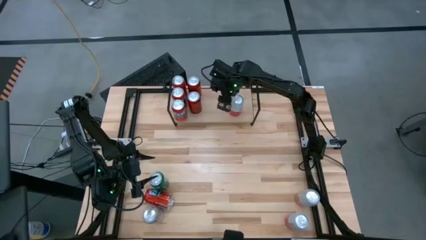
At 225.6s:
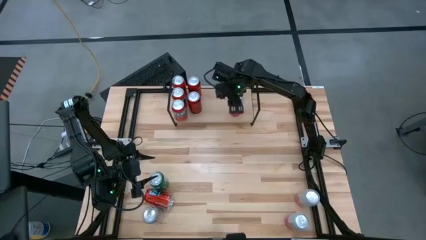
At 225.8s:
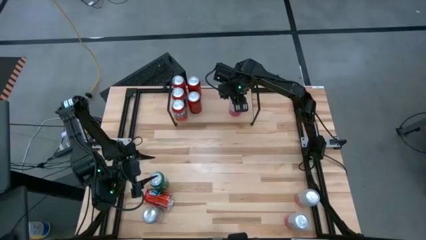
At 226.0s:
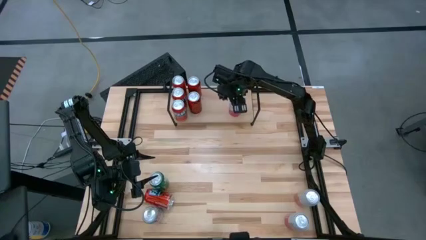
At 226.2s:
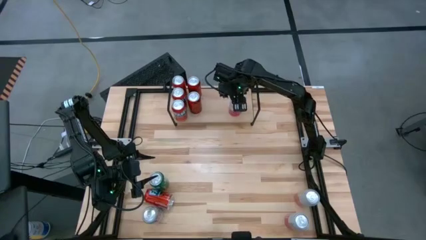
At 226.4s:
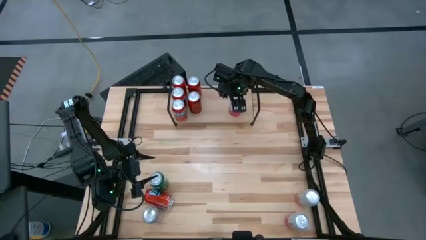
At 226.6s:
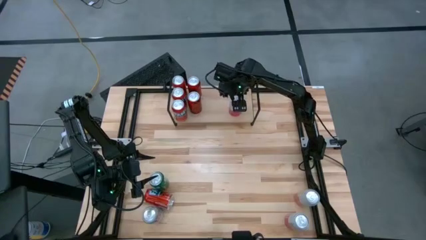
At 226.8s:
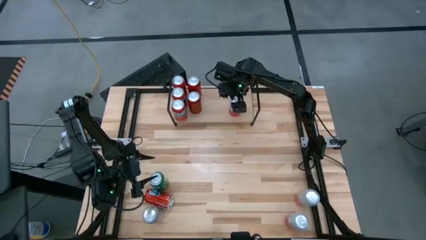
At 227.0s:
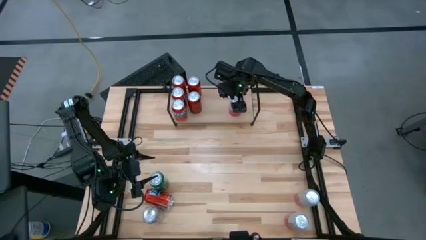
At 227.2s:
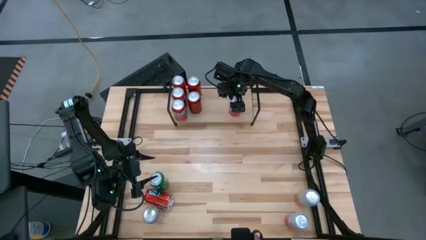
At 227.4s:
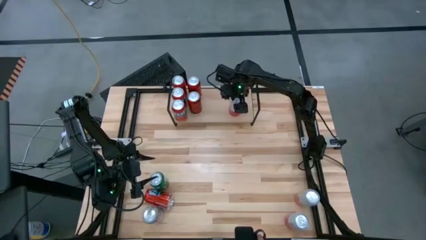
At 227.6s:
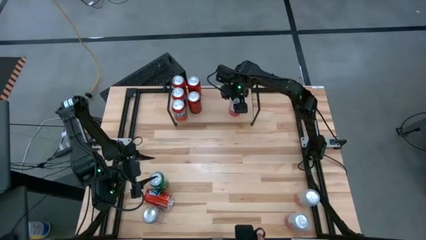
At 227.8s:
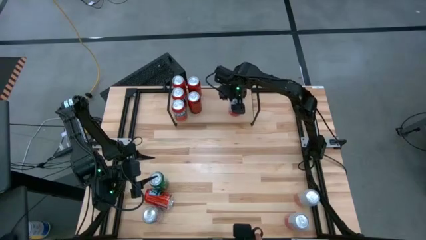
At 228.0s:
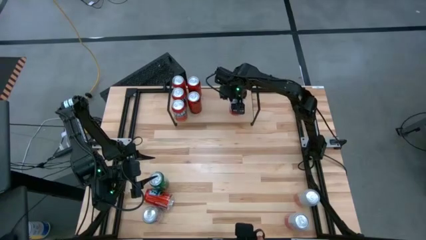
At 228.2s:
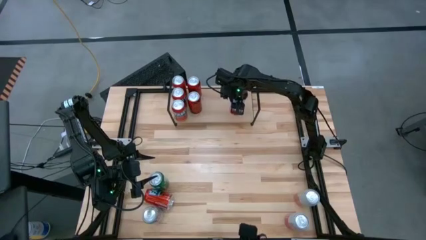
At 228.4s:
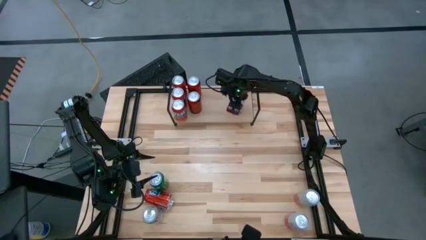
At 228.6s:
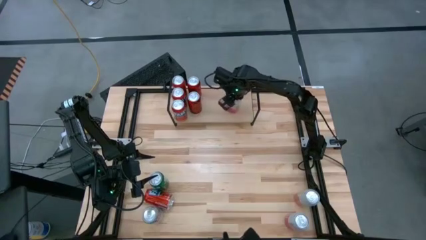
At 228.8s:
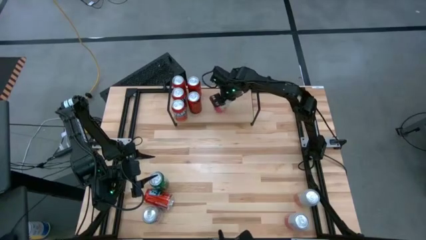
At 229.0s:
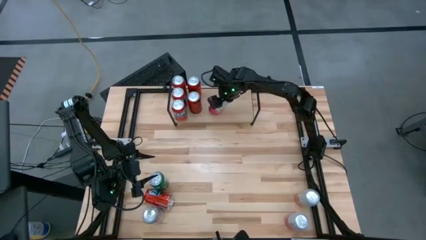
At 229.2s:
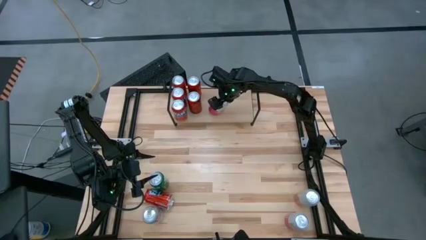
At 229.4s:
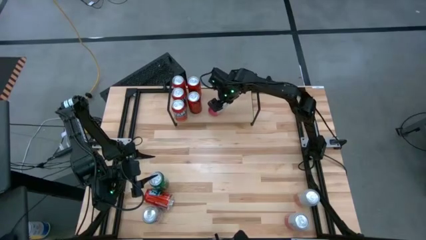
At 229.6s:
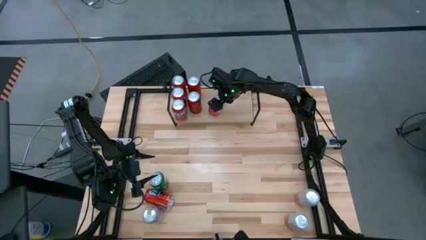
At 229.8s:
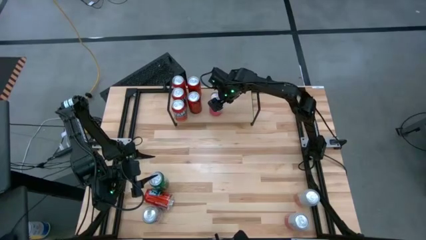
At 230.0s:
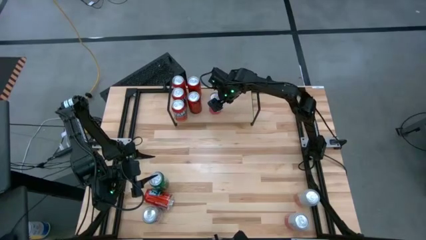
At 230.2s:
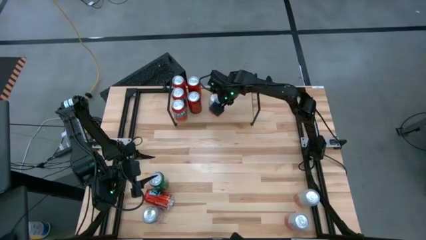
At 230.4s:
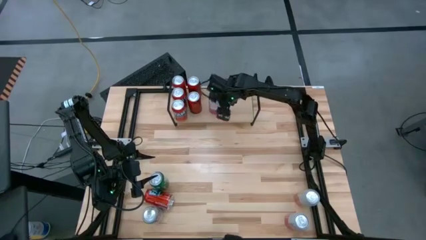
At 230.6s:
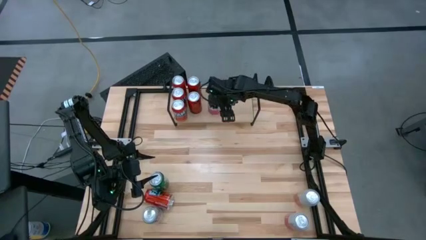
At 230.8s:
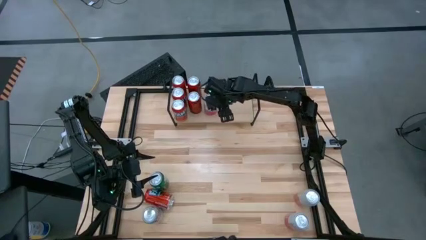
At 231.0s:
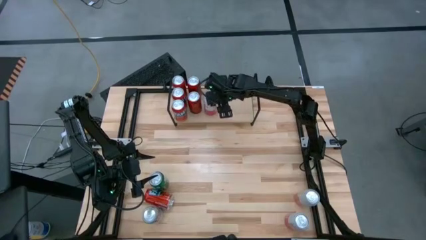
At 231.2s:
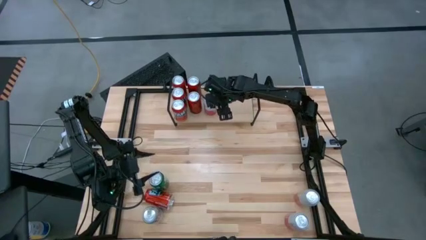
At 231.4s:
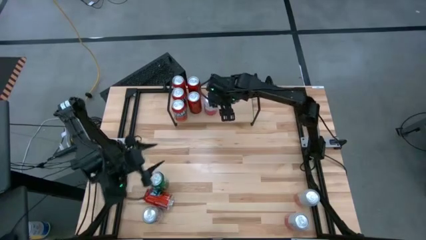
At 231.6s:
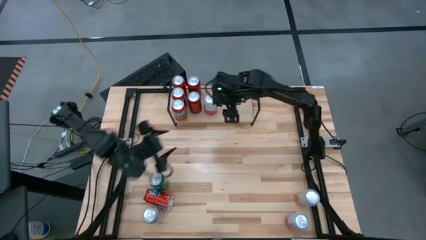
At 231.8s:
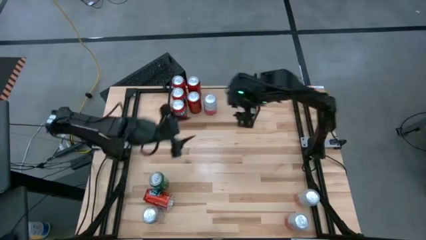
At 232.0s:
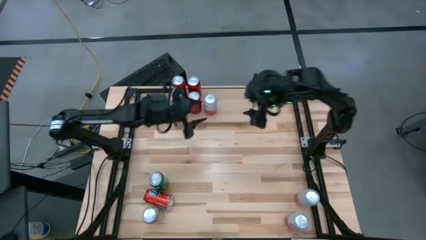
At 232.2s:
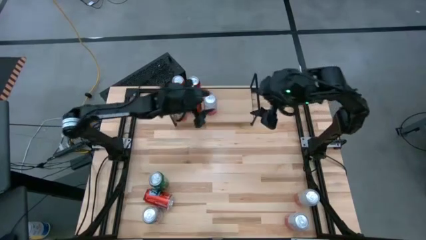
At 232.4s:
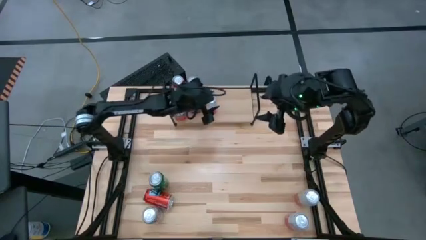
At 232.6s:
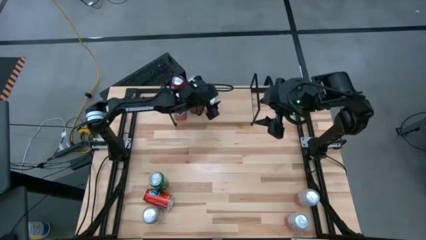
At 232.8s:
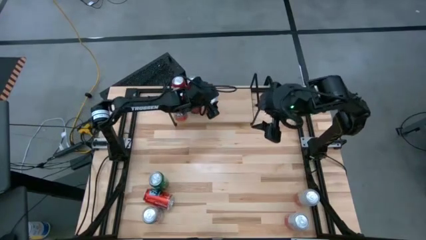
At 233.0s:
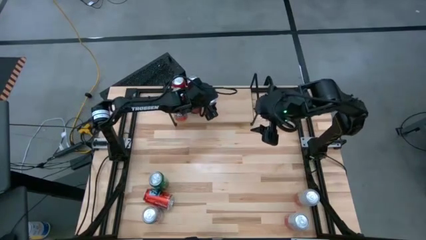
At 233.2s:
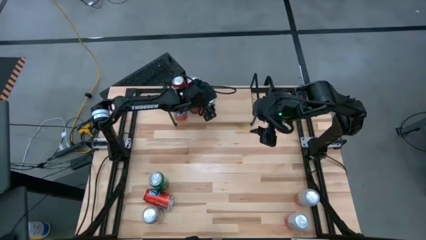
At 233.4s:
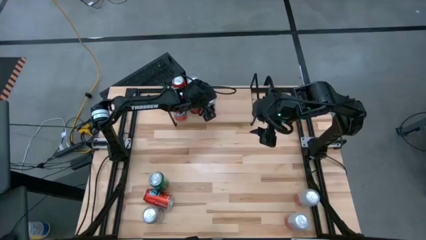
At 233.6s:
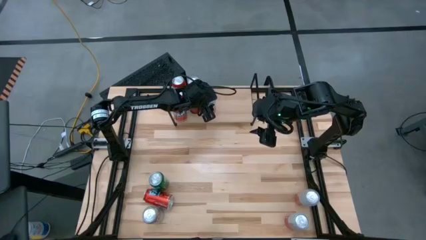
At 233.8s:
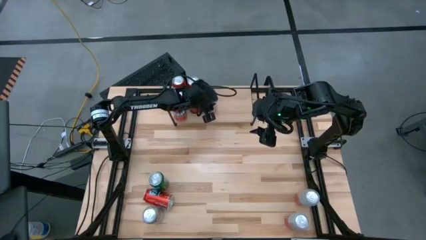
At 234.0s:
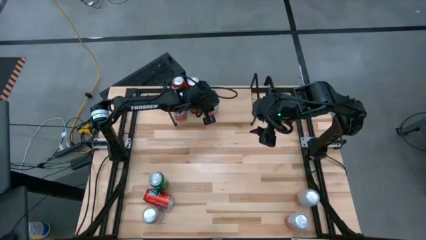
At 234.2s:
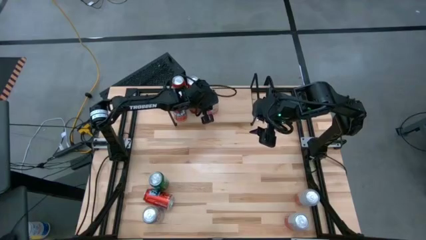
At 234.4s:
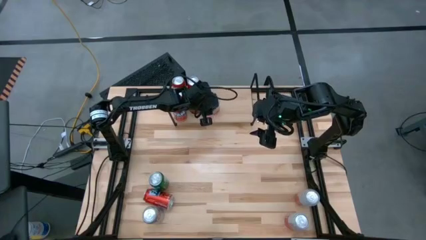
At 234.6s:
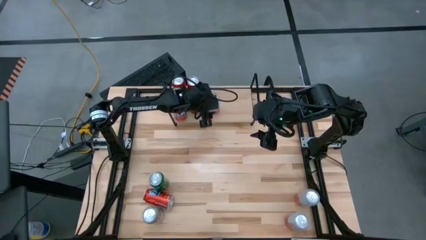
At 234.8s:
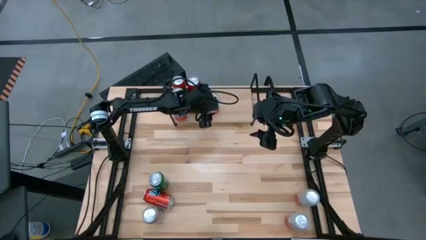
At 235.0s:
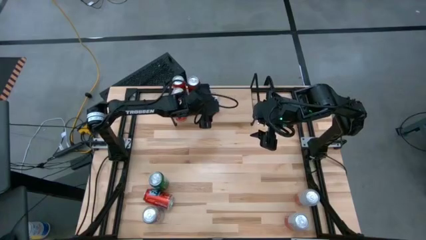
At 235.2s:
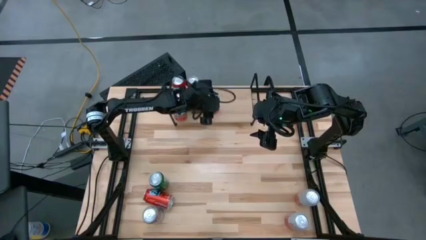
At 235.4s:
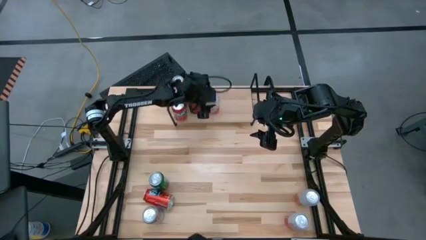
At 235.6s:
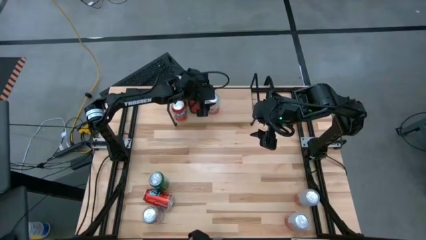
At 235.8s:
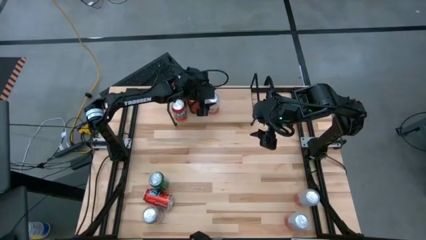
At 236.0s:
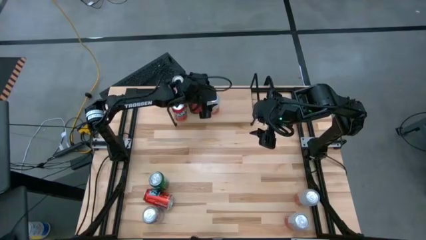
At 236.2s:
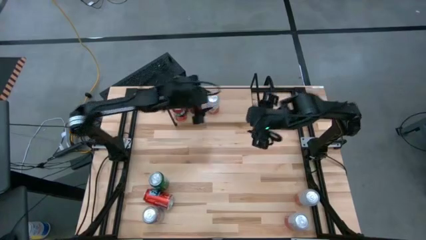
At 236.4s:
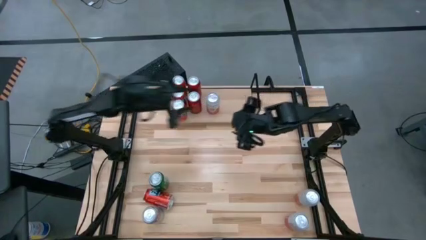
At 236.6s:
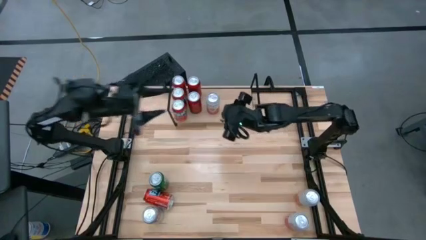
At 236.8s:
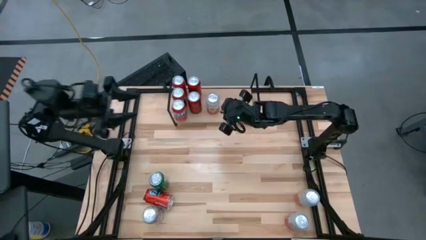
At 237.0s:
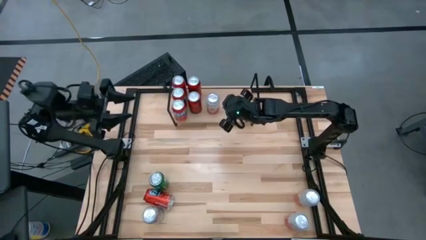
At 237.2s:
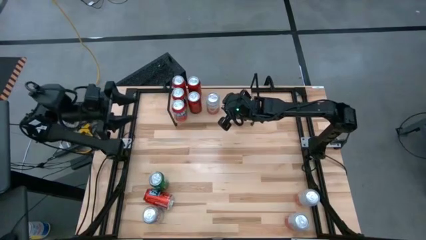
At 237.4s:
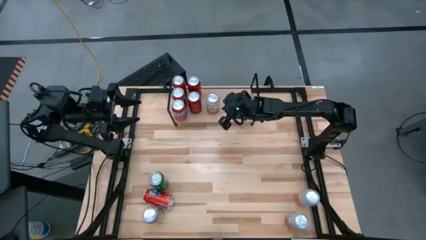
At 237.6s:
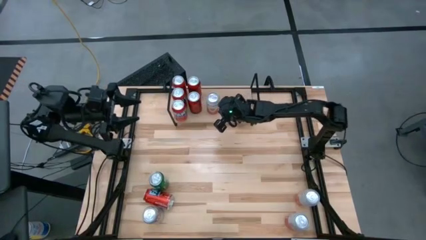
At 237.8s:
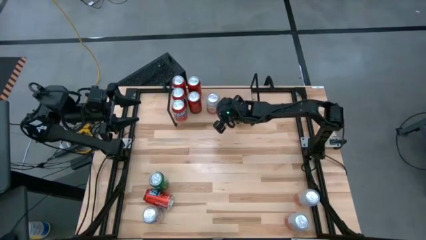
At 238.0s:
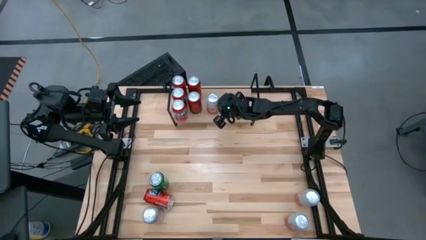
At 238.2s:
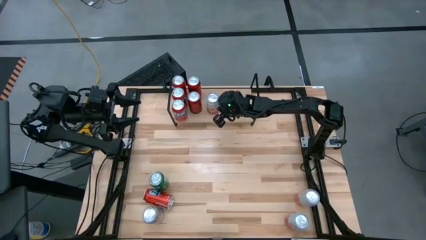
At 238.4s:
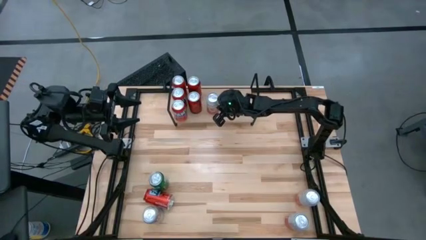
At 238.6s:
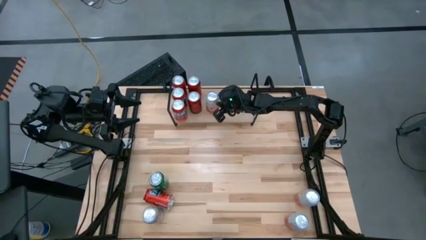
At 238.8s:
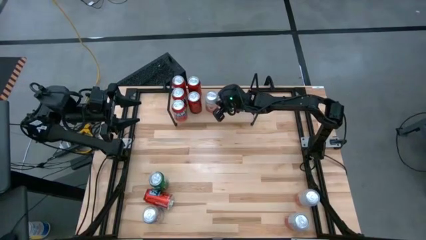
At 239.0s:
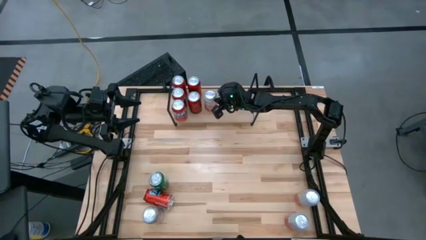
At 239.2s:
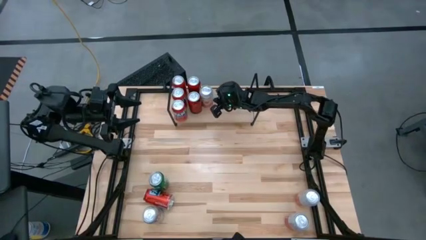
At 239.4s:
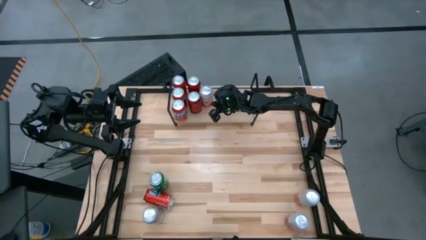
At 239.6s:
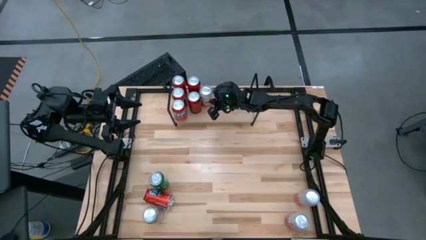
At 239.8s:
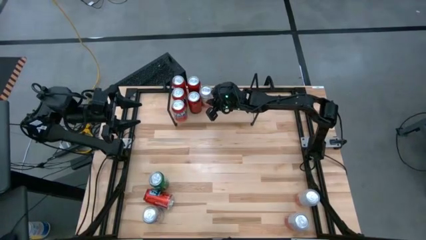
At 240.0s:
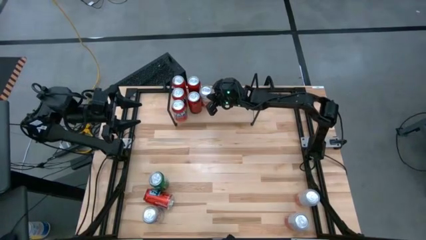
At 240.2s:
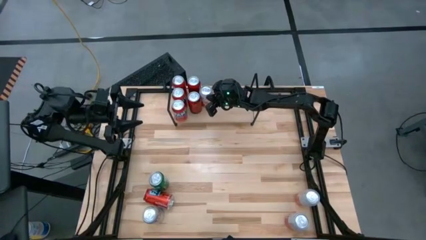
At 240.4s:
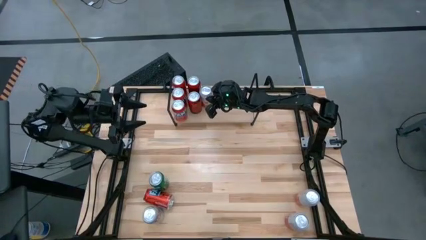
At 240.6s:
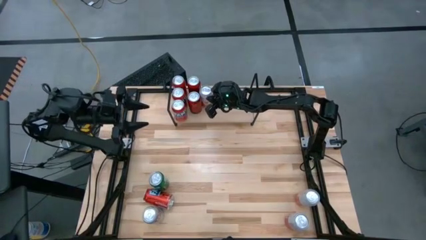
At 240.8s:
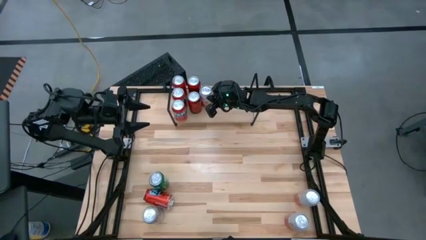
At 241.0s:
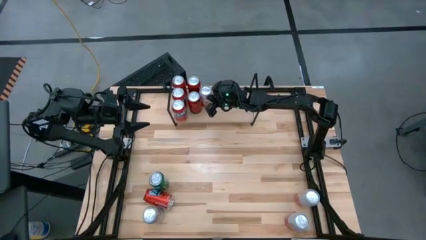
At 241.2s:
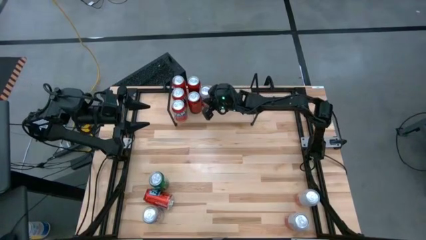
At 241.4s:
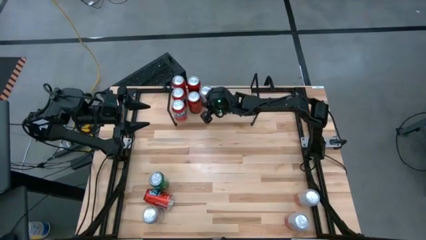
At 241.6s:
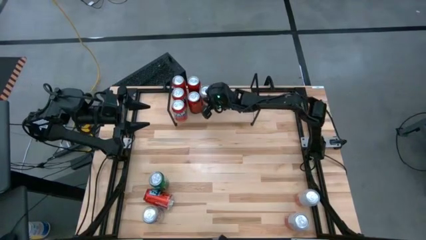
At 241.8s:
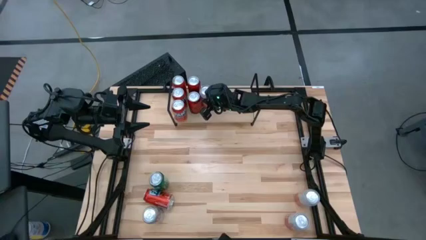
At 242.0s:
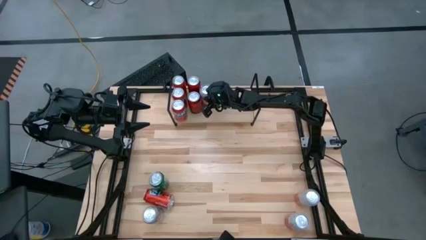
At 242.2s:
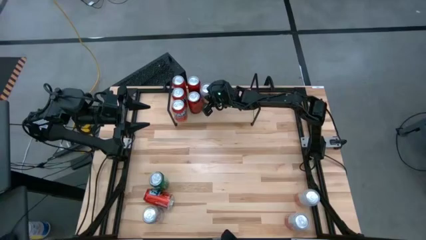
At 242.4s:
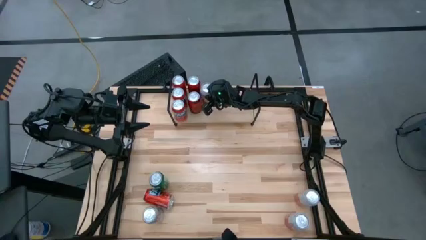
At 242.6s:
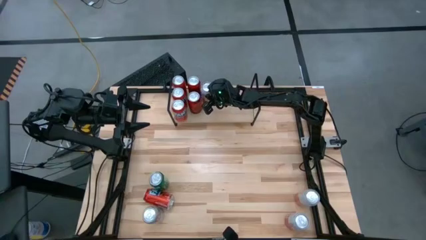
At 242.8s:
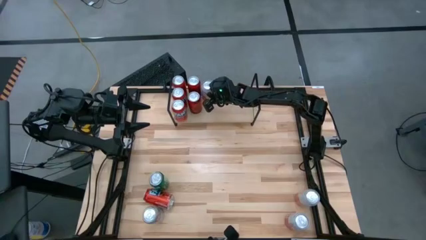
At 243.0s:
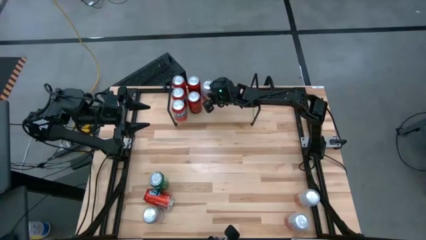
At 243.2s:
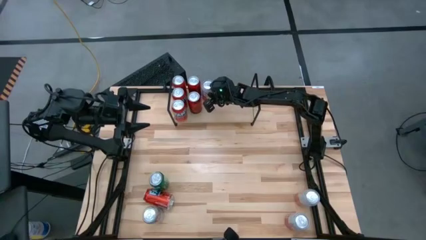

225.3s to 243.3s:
Task: Place canned beverage on shelf
Put the pink white soda can on the shelf
